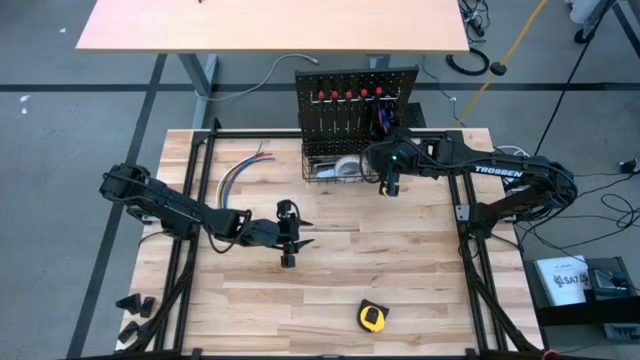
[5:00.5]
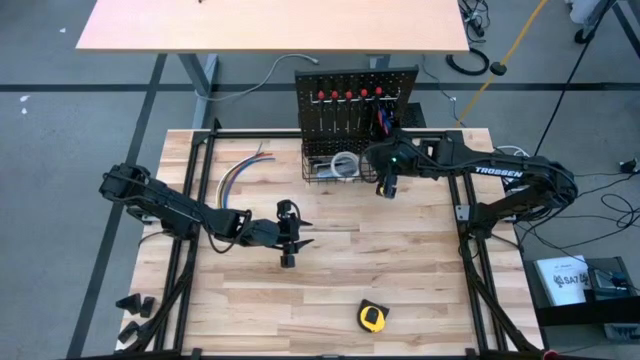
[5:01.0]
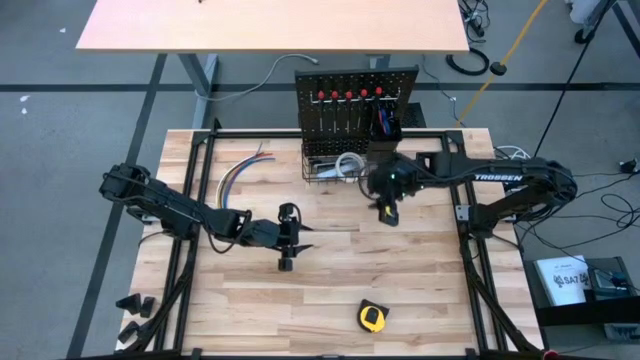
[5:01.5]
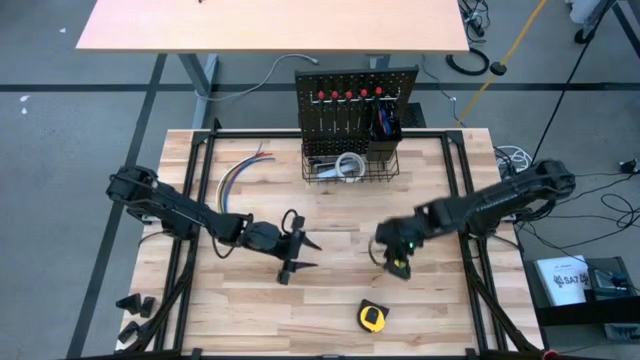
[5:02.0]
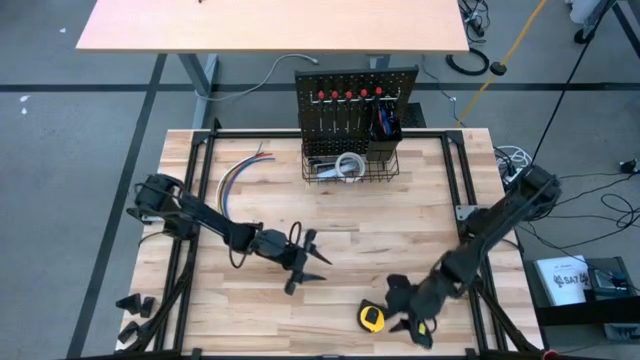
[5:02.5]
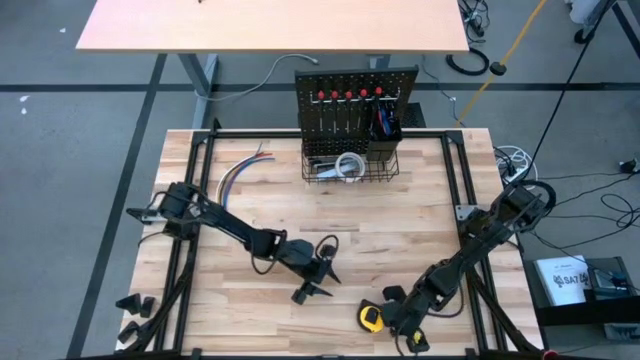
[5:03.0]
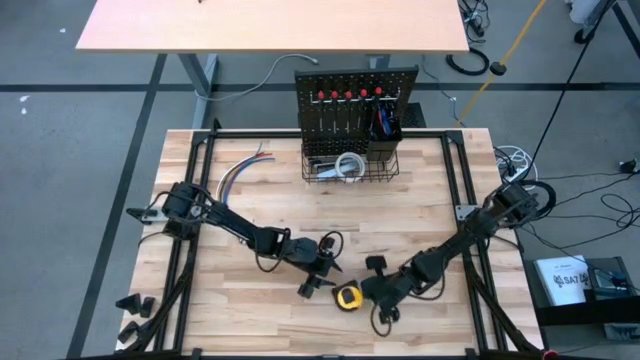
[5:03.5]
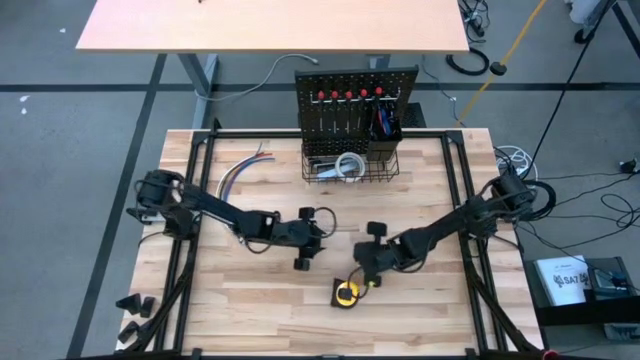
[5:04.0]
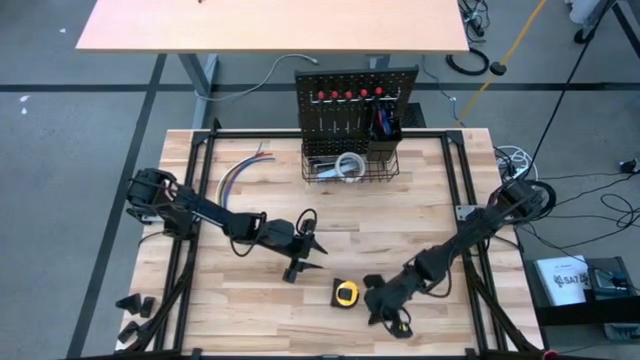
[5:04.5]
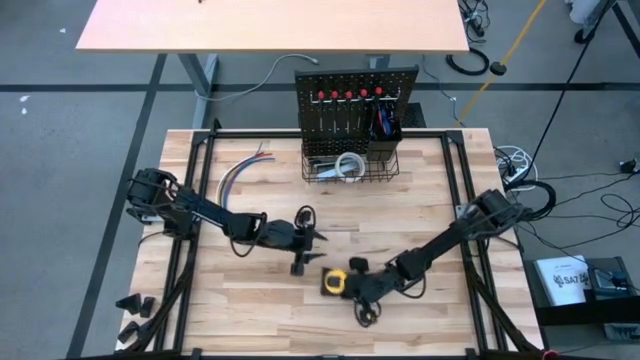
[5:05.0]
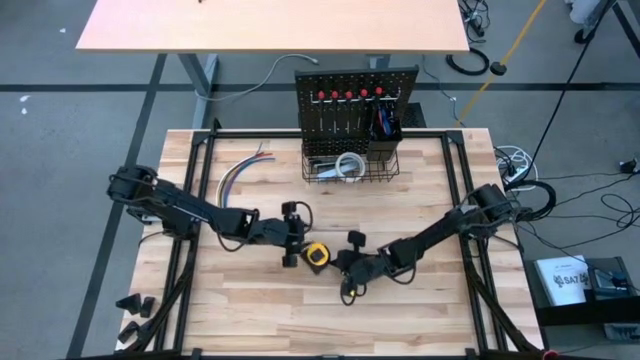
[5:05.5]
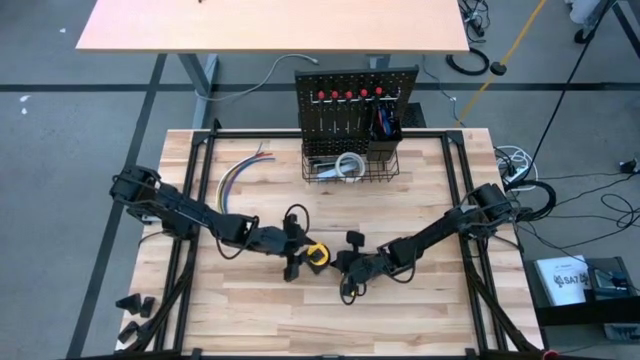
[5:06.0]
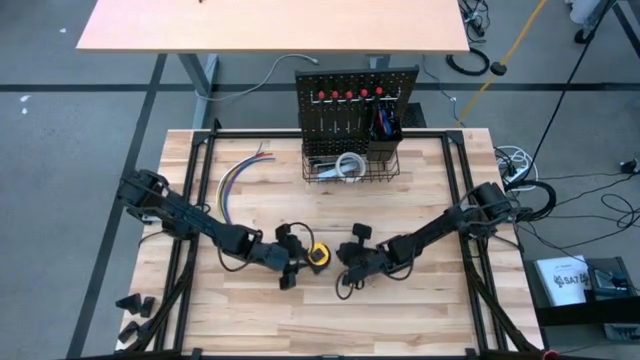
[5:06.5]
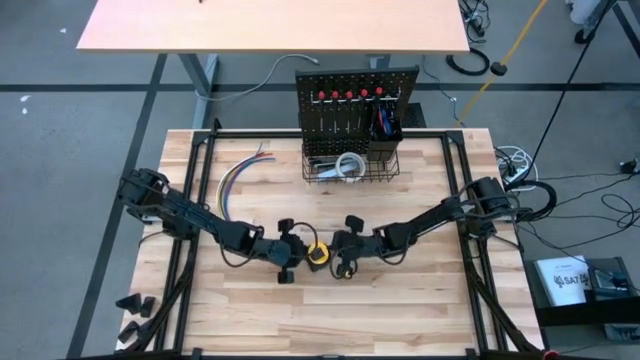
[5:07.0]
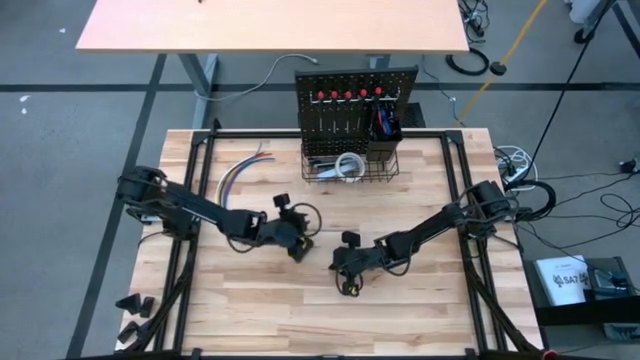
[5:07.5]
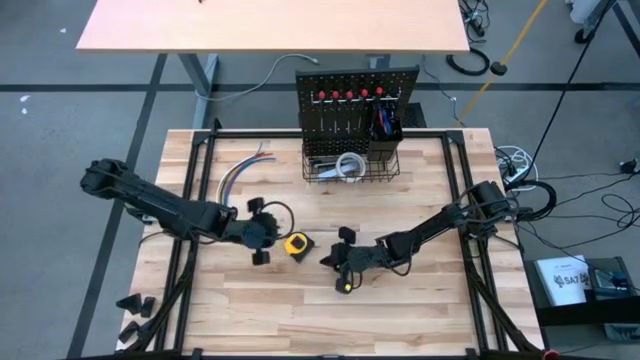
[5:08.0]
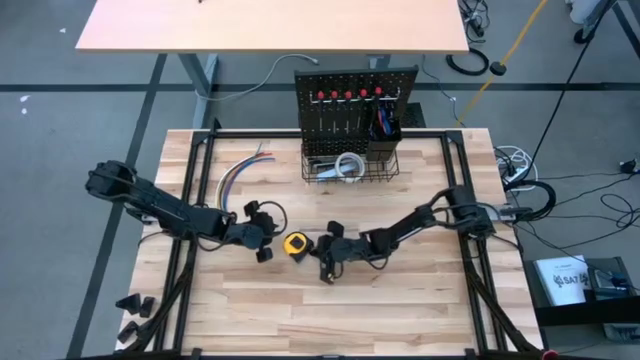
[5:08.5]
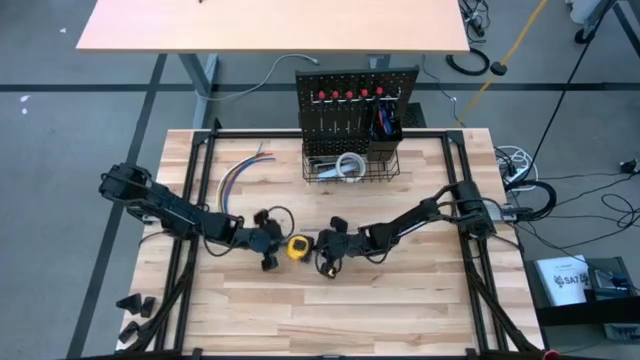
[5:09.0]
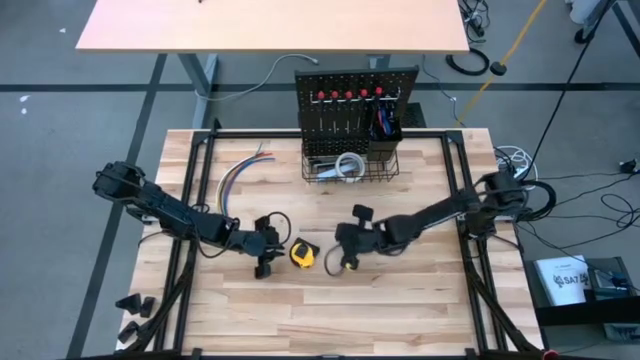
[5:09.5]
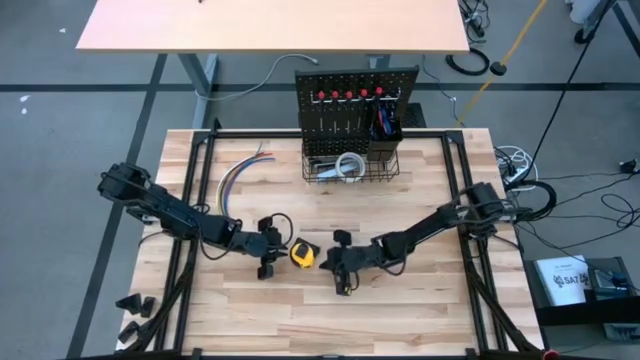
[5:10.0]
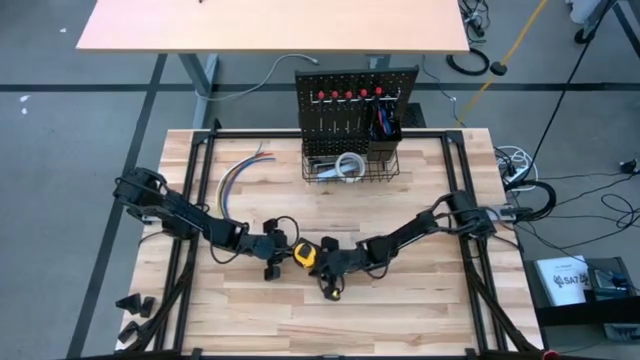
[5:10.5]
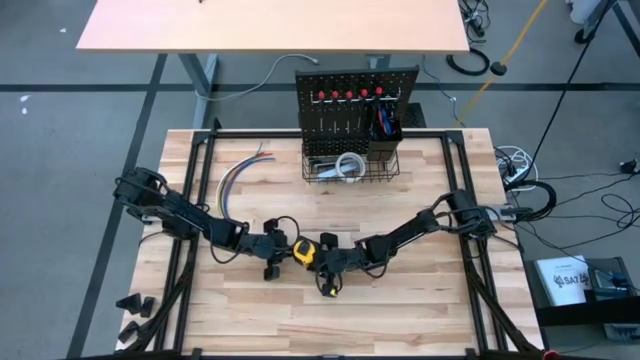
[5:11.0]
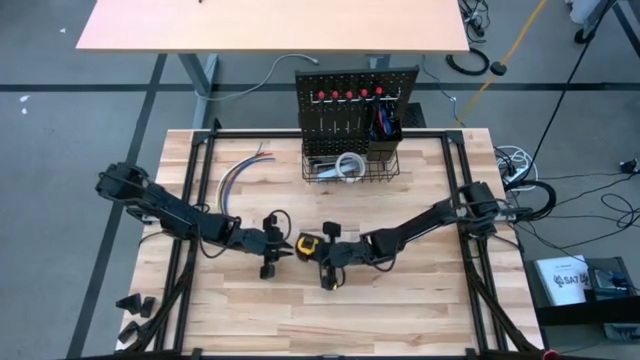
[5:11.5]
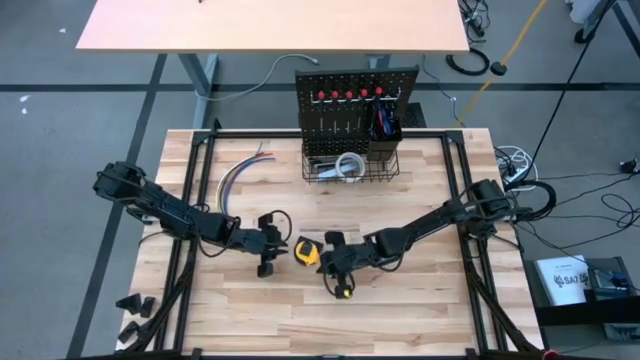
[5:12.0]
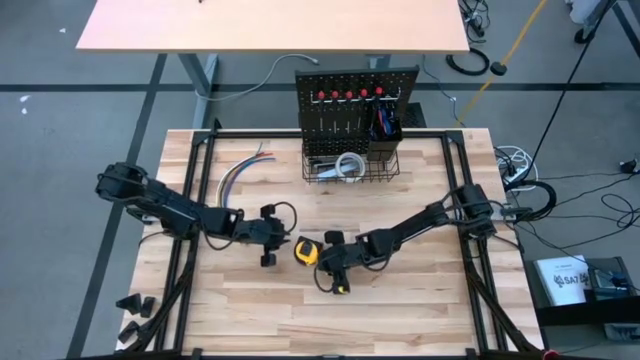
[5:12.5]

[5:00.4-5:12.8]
Task: Hang tools onto peg board
Hang the tape measure on the wire basket on the pegboard

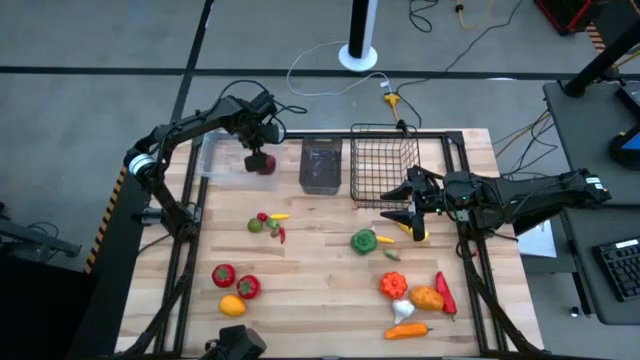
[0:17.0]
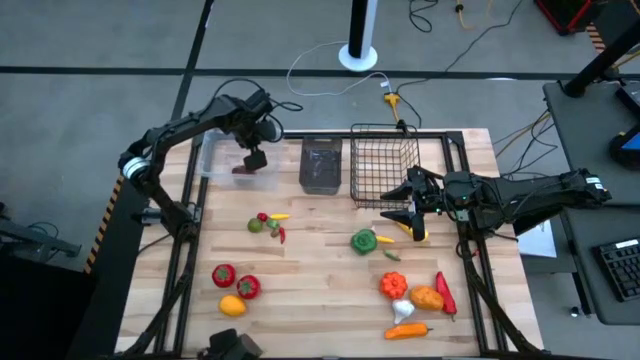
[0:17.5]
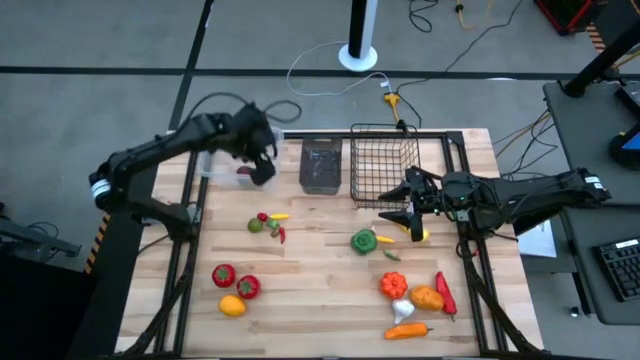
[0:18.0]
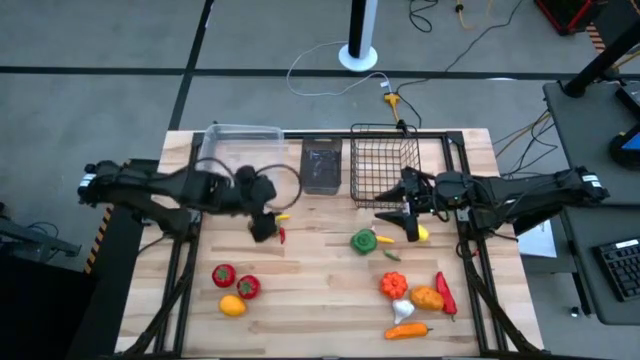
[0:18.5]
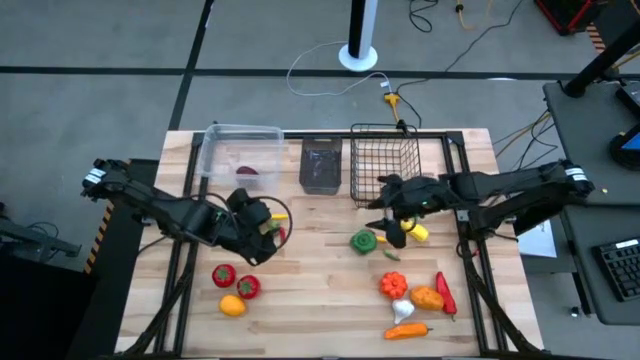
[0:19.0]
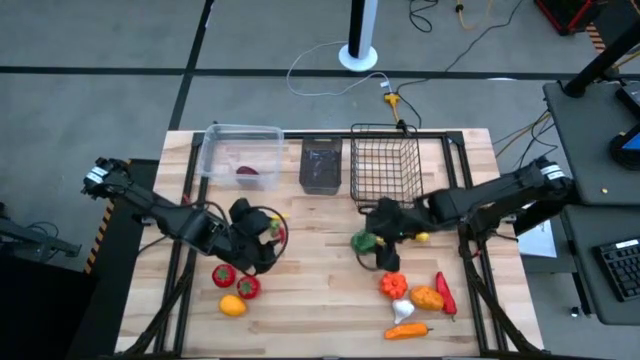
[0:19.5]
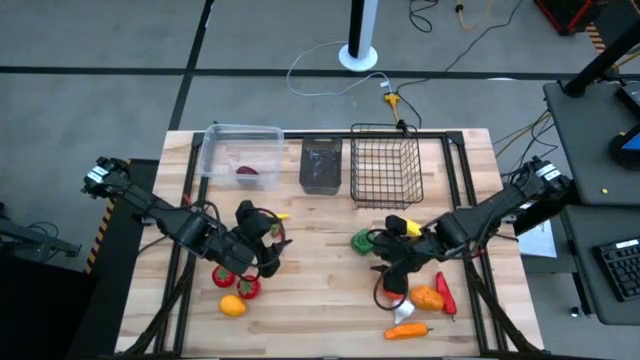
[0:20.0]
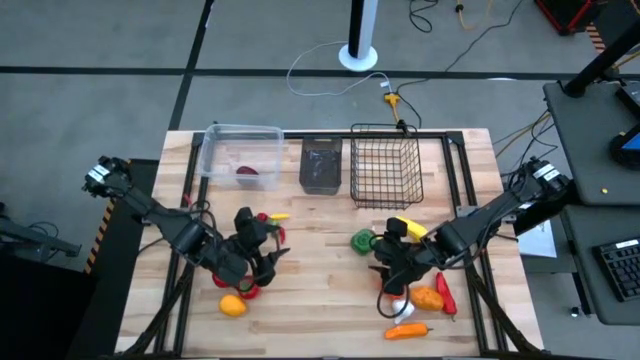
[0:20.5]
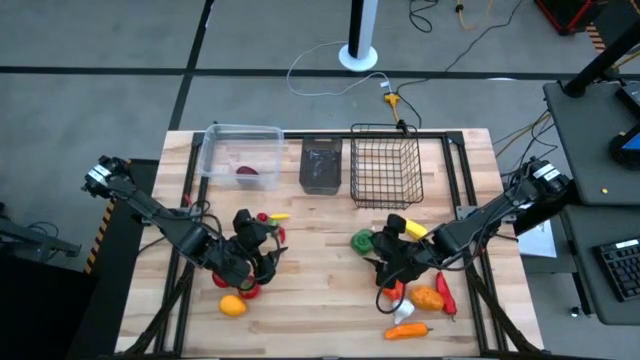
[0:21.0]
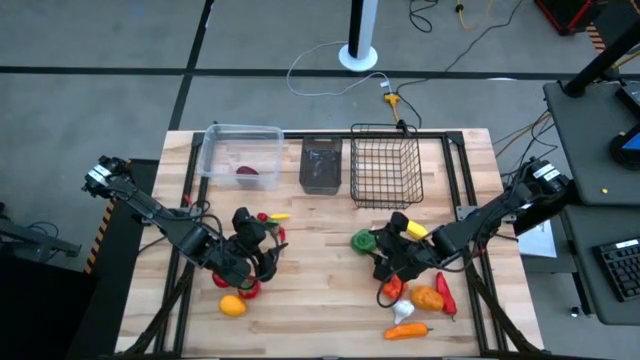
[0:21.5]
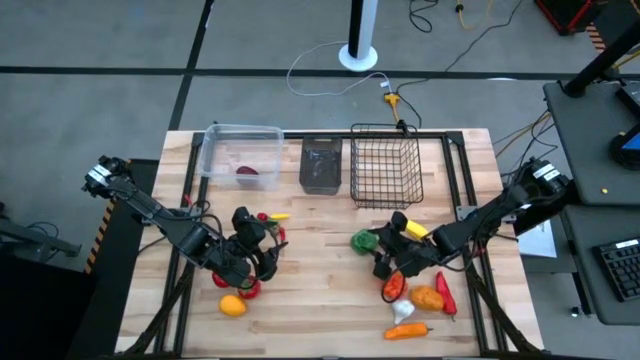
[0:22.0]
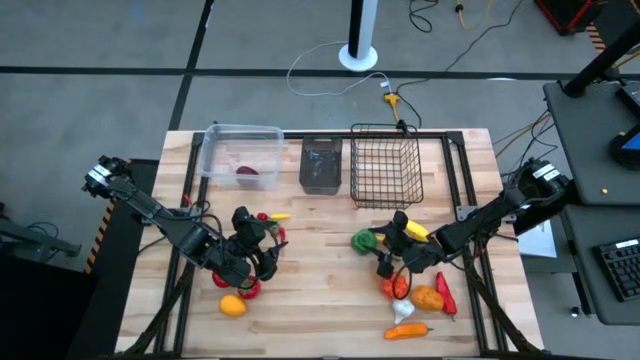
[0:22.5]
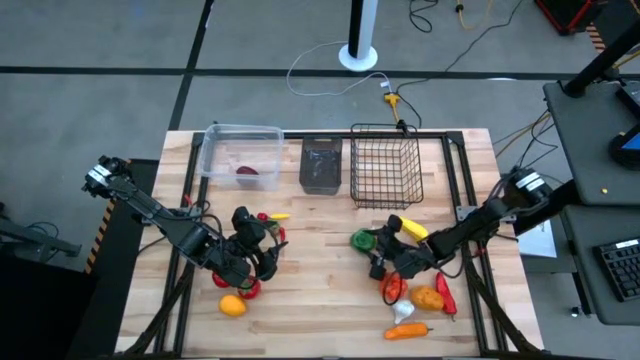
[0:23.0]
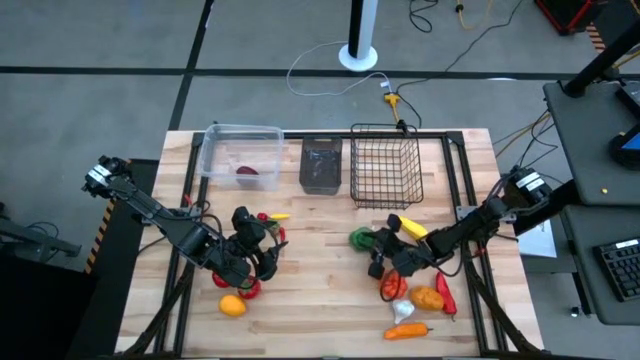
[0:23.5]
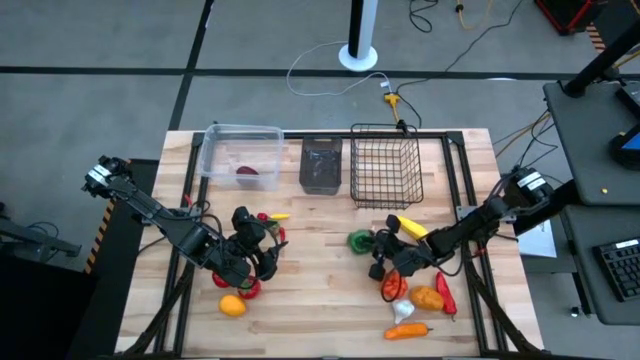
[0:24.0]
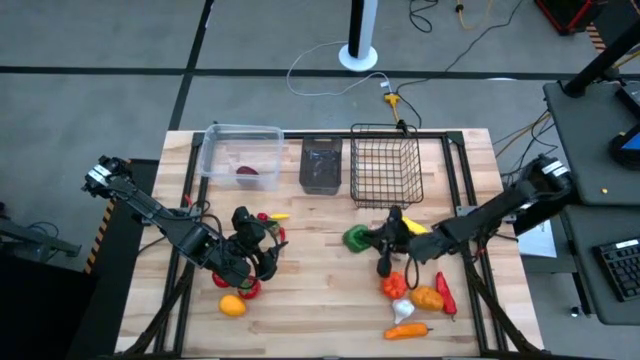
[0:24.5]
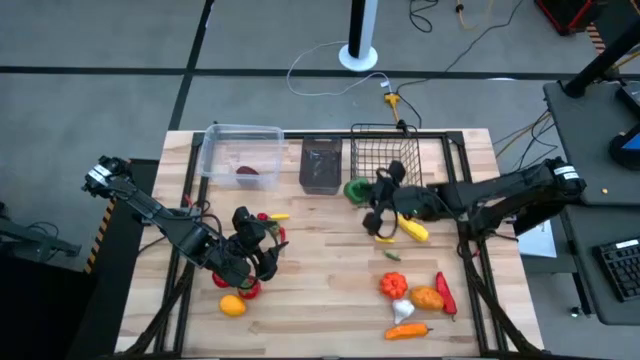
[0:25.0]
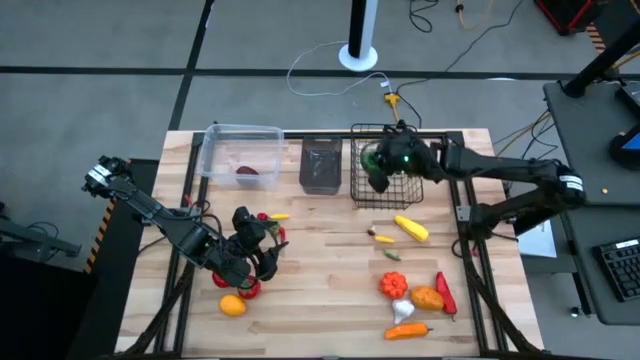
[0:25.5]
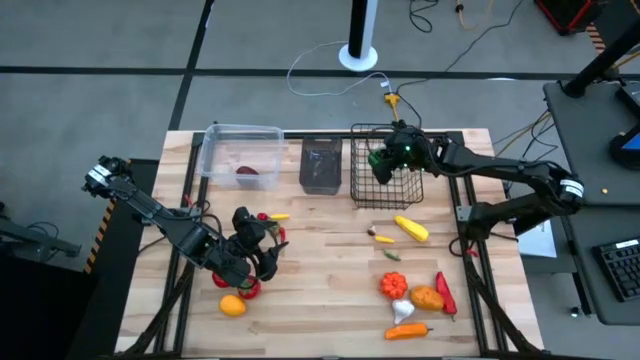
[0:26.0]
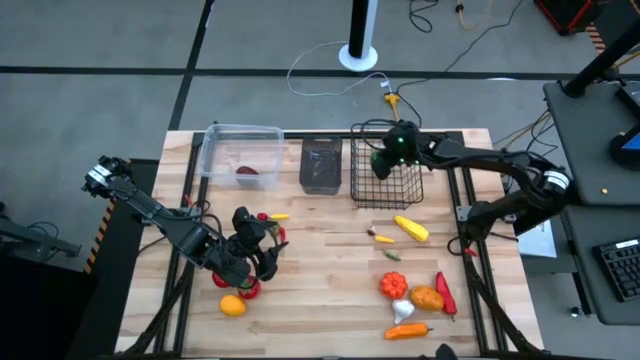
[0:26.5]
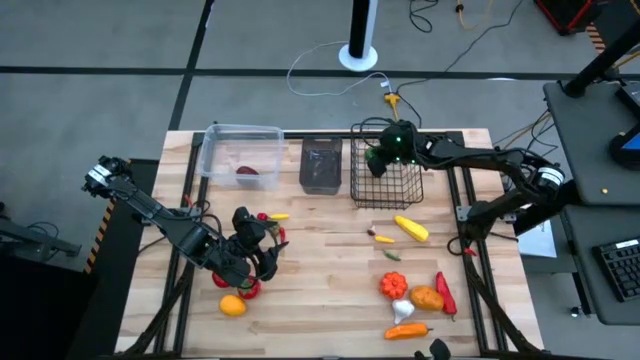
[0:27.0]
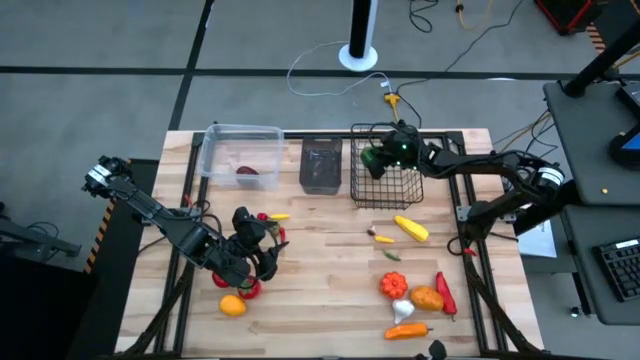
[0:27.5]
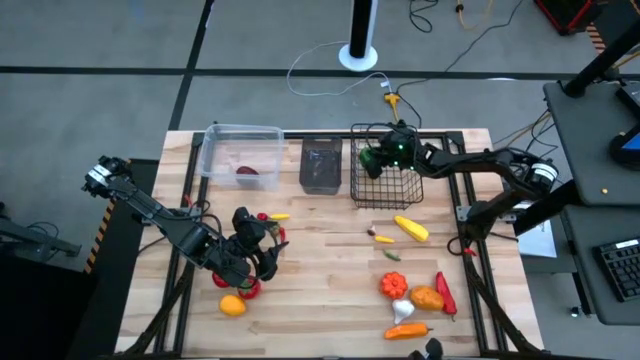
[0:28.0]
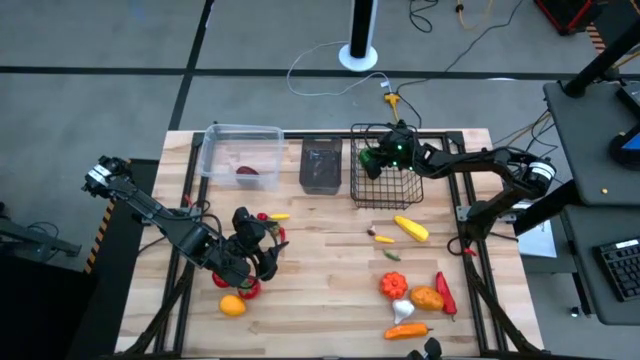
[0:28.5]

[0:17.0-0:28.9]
Task: Sort produce into baskets
Put the green bell pepper into the wire basket
